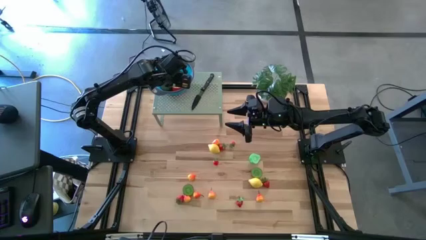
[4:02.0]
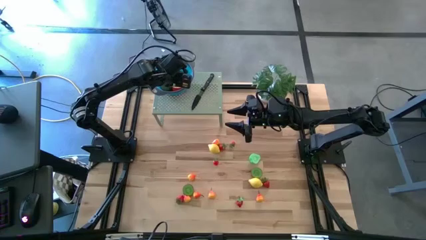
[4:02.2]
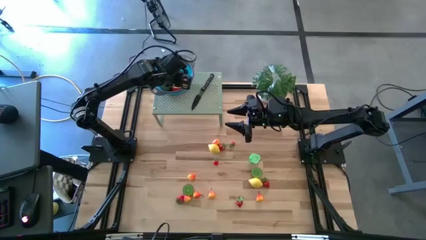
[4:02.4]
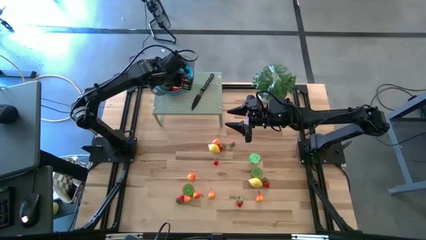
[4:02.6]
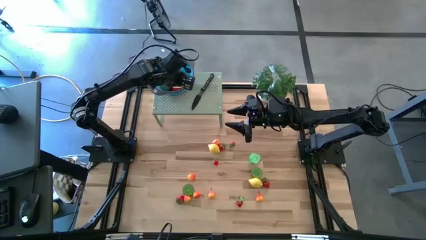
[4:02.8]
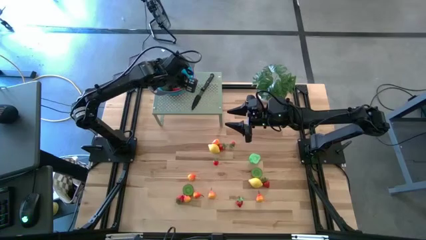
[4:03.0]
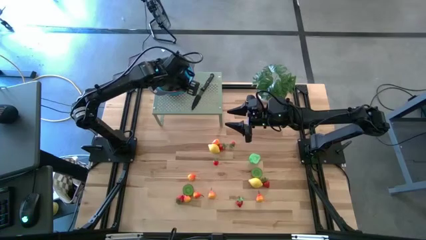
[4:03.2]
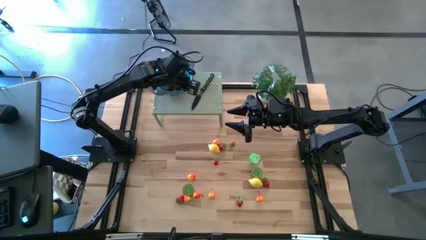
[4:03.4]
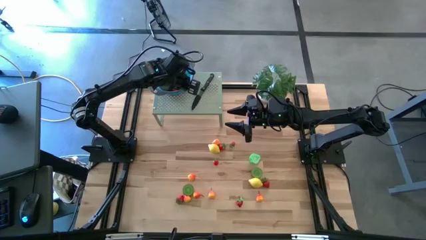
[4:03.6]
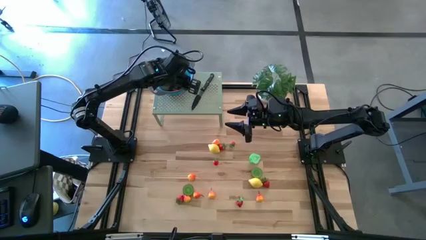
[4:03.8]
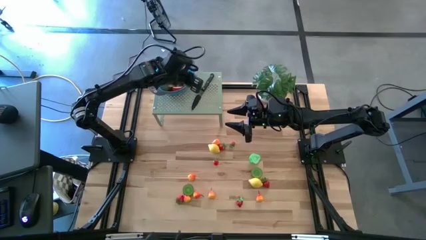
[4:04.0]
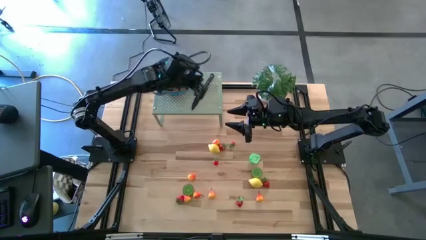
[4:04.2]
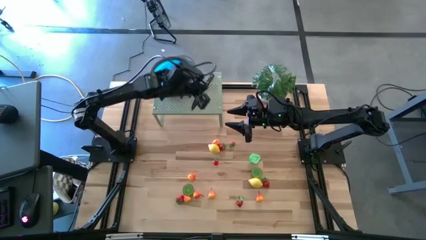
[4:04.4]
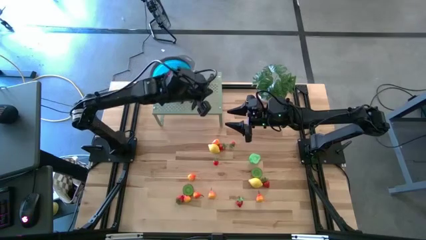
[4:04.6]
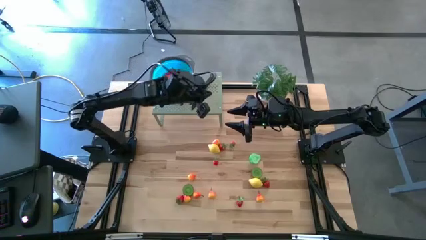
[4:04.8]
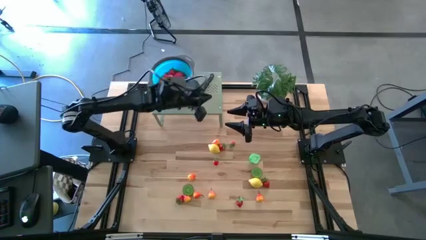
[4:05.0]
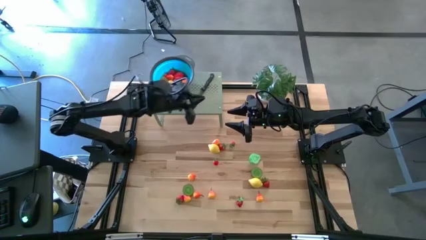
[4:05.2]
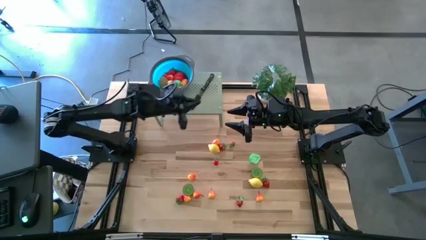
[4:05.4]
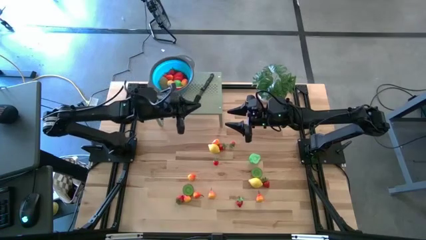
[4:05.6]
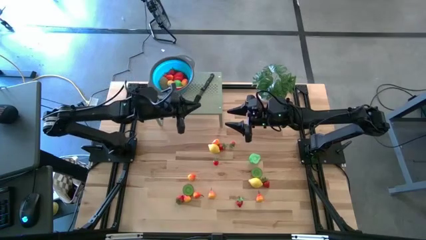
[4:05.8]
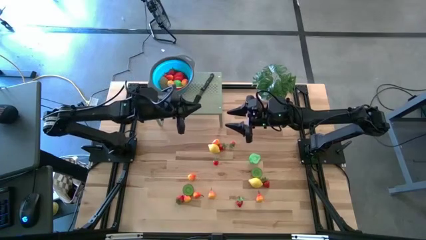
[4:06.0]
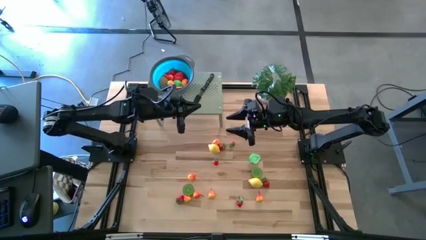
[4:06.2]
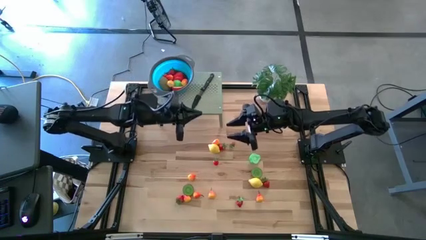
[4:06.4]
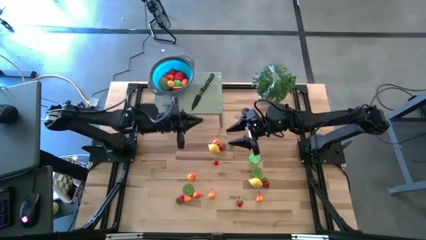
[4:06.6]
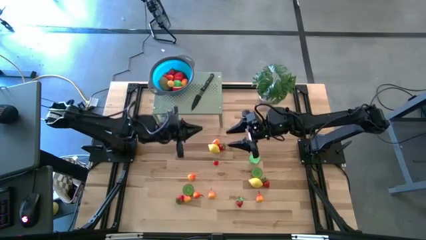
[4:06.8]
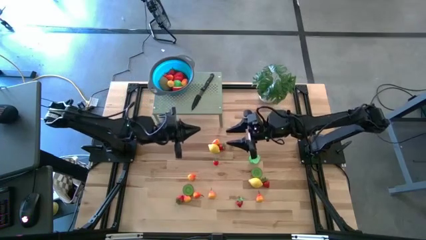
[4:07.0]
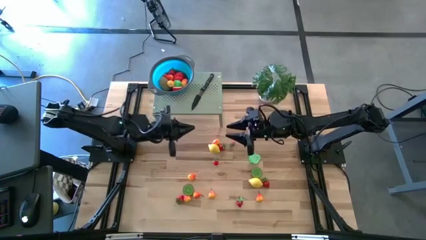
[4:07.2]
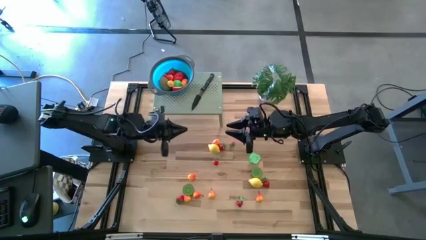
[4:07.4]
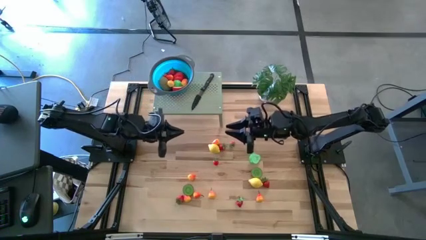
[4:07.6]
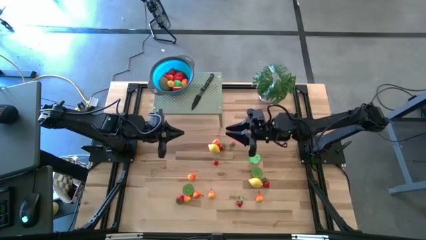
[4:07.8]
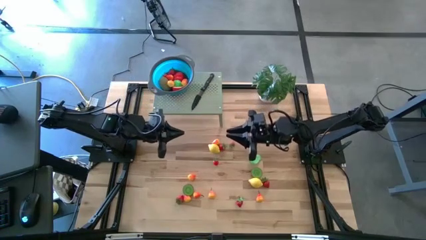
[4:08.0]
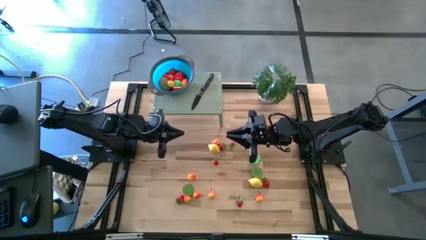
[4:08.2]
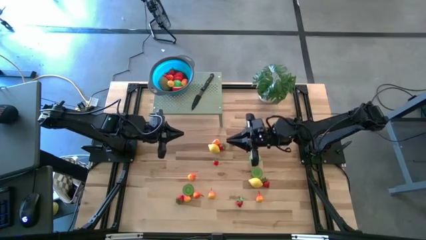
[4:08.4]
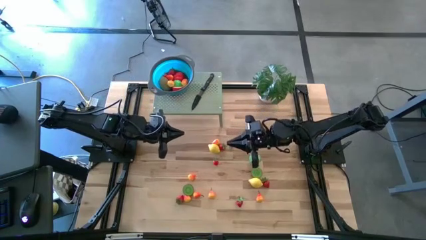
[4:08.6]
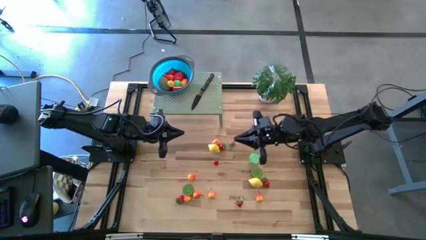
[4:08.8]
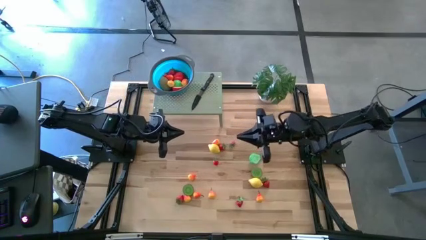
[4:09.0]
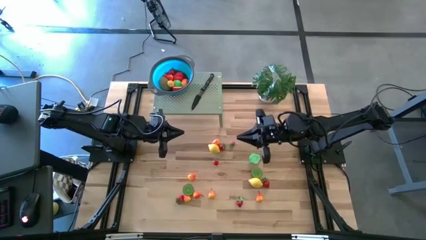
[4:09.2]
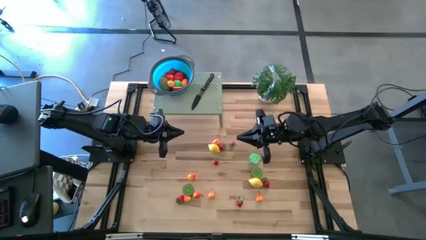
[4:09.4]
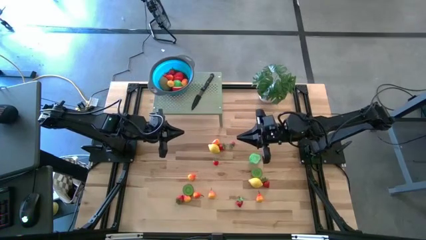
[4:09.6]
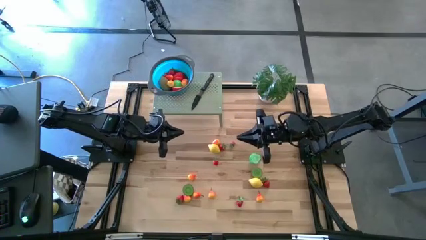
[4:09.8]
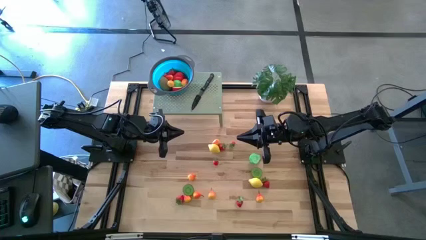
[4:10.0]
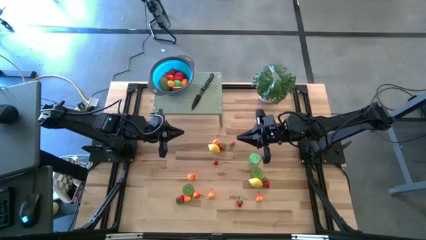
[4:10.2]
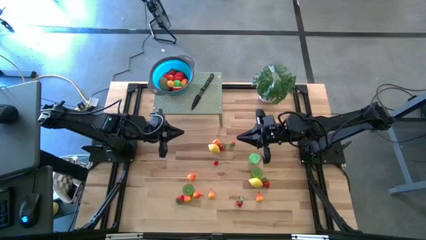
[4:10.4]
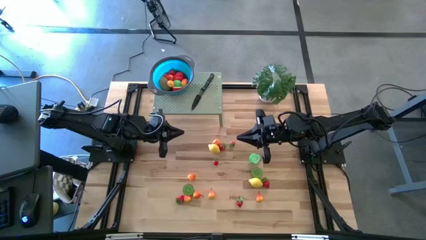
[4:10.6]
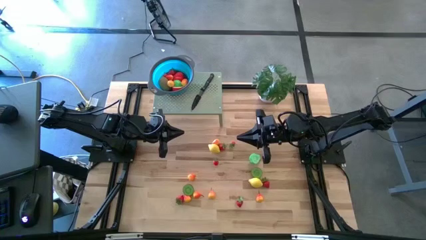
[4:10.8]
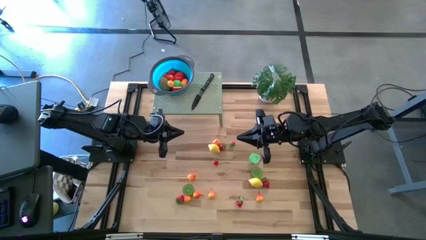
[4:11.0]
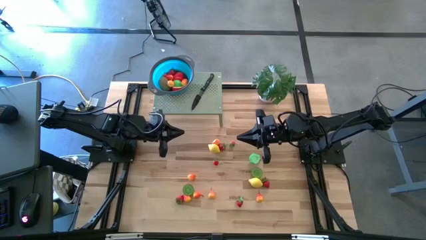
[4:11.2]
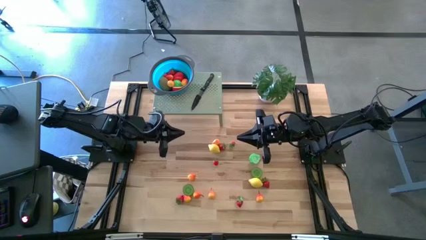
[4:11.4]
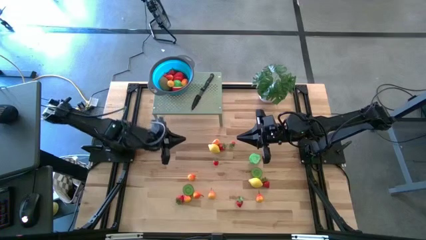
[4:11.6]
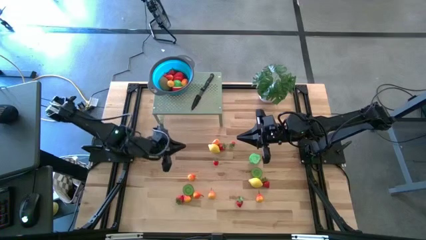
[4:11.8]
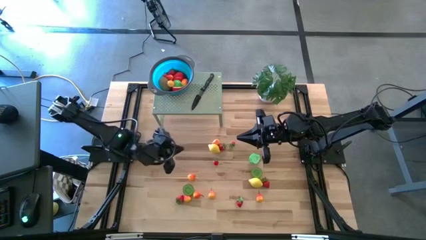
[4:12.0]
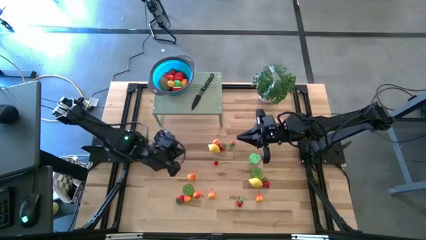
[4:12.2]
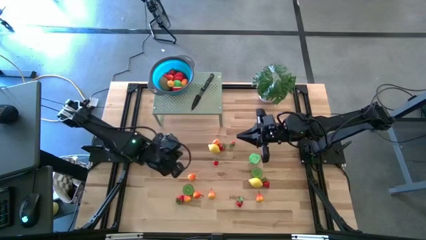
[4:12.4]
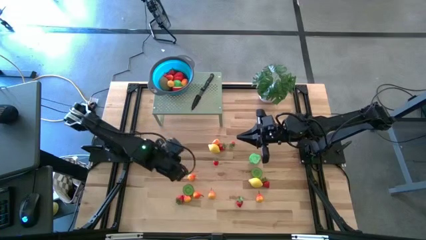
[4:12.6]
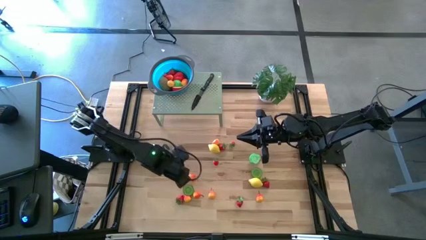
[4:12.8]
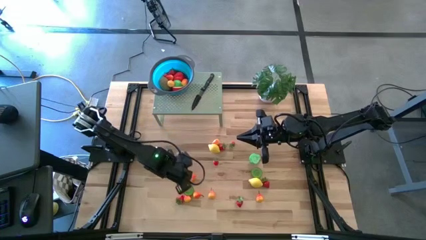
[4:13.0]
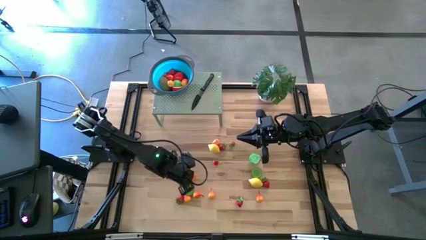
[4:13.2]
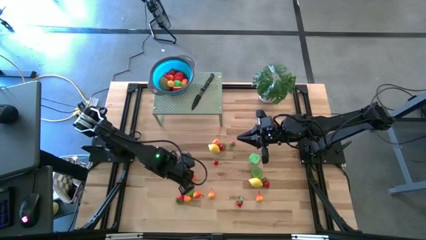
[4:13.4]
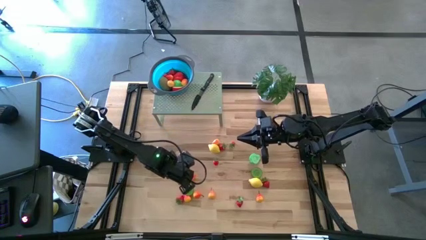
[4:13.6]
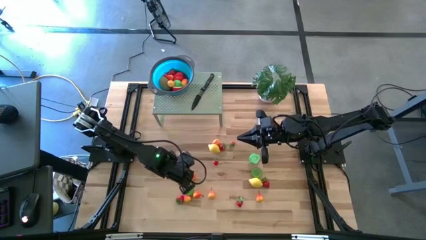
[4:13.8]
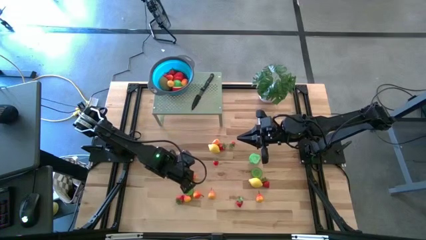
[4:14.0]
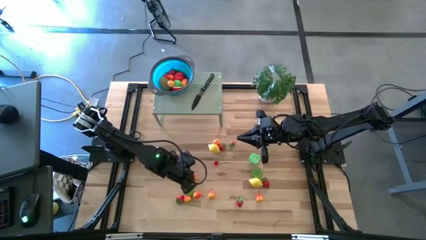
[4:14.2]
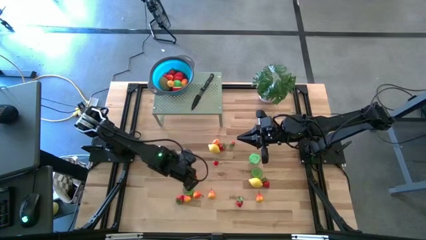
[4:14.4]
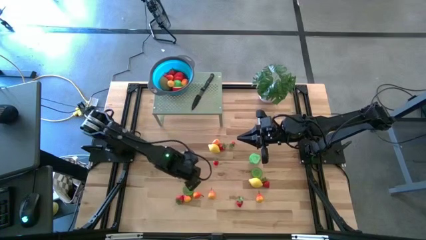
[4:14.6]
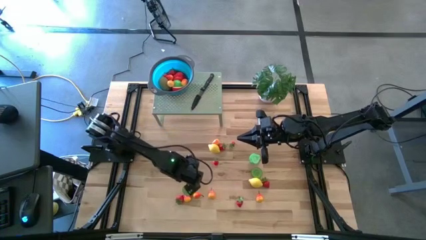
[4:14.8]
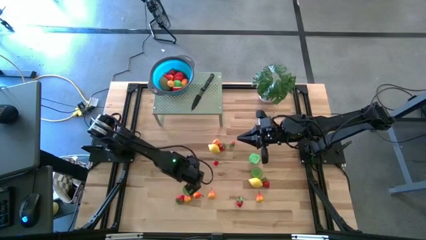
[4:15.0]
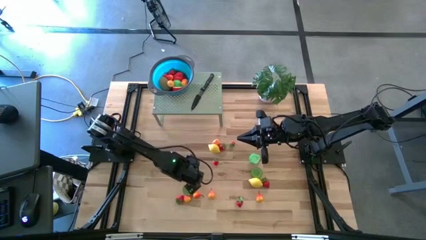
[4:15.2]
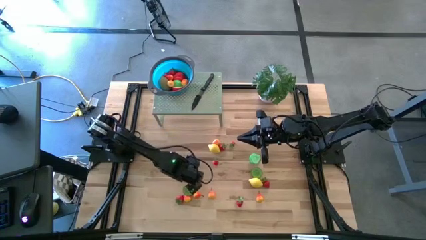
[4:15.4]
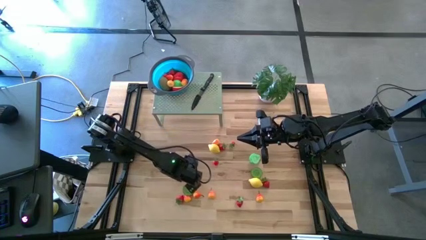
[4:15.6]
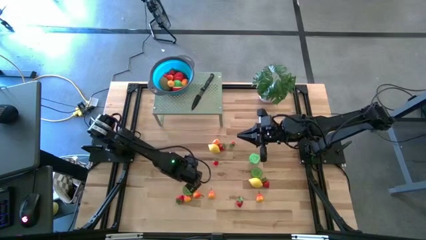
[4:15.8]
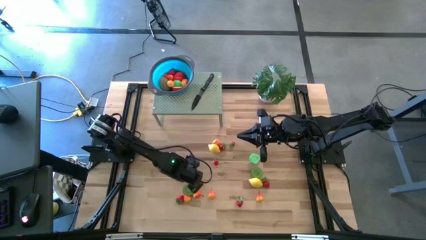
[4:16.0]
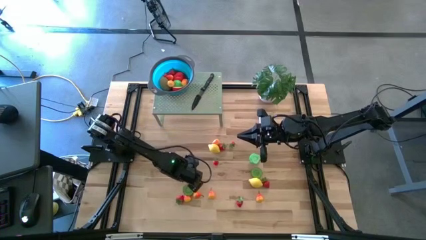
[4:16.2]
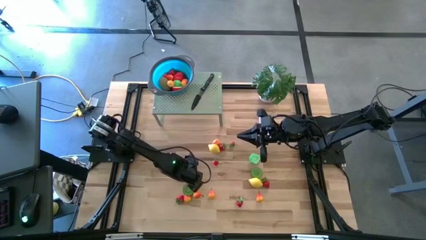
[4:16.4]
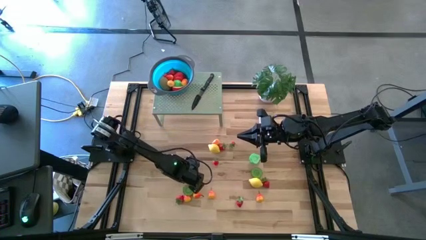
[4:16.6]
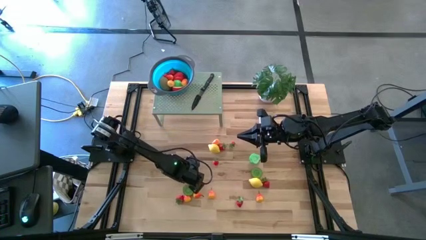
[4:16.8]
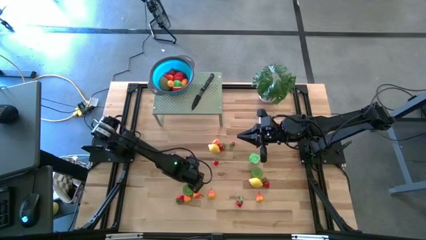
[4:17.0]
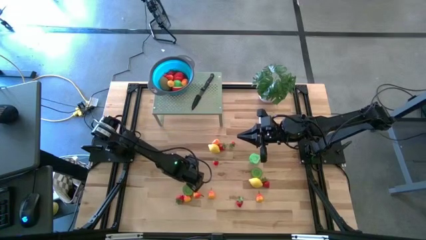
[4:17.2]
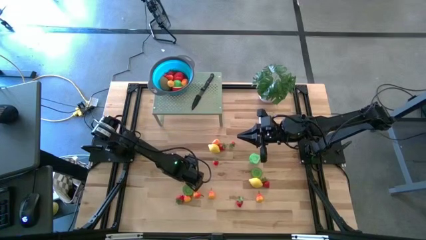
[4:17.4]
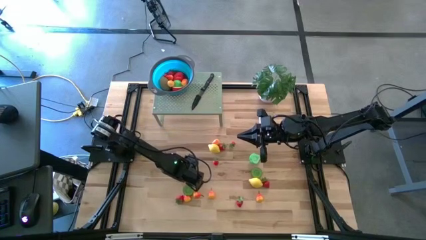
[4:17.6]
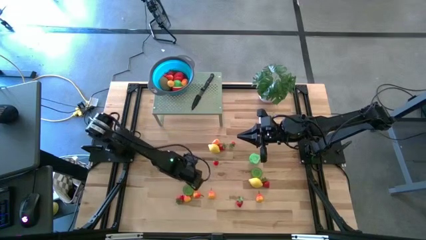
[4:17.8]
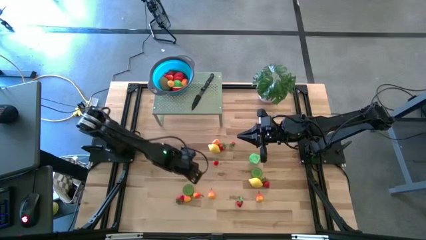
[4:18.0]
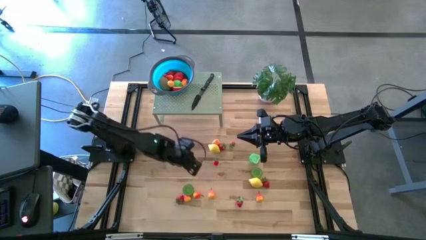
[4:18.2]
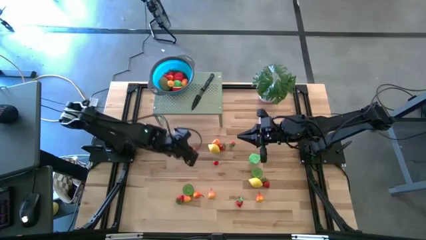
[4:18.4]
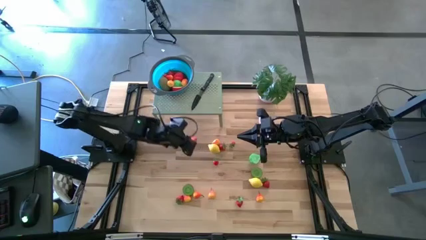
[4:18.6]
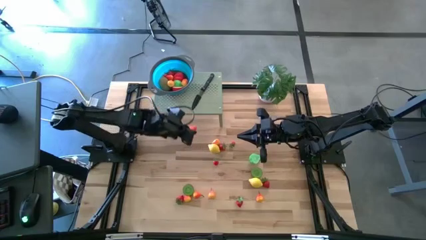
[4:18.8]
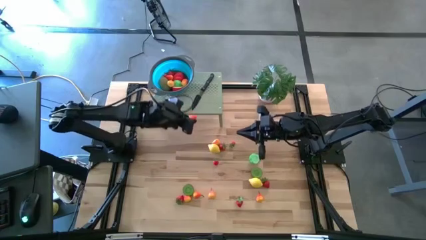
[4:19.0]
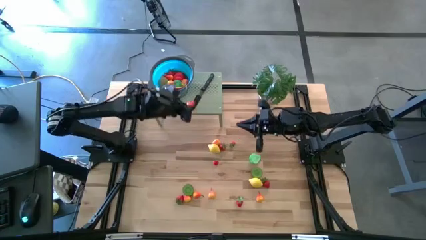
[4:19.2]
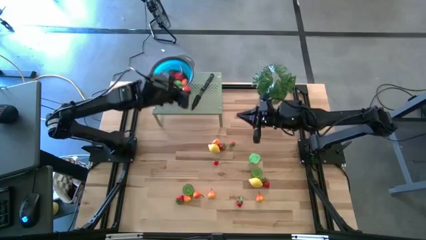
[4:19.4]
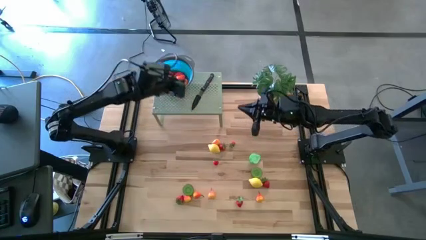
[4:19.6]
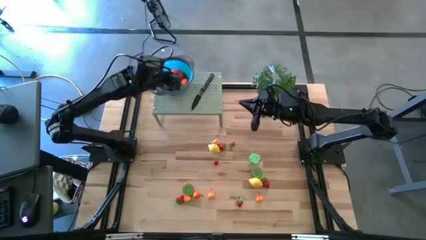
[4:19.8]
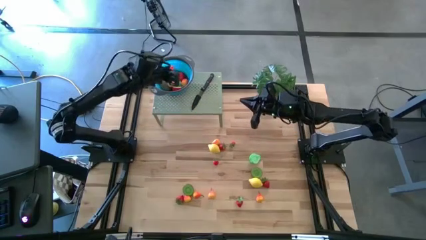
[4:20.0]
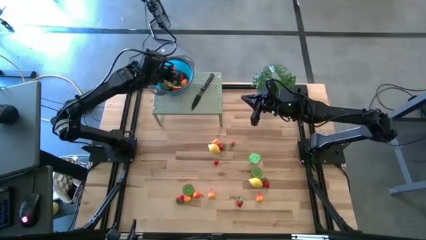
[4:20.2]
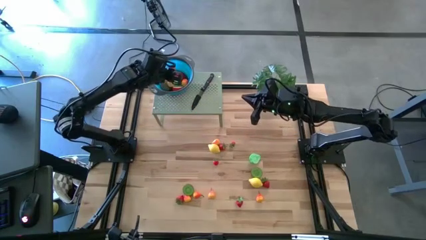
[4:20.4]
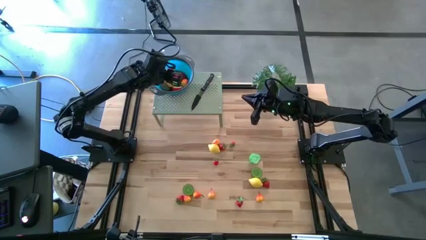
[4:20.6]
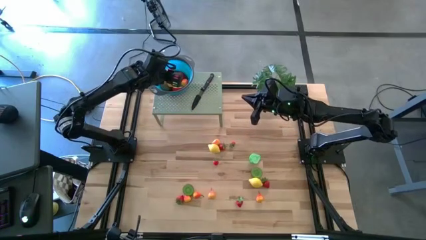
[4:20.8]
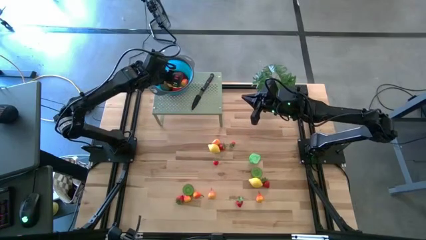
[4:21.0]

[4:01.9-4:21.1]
Task: Pick & Place Fruit
Put the orange pear into the strainer bowl on the shelf
